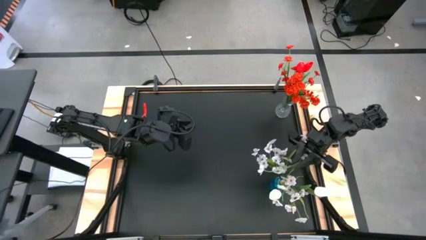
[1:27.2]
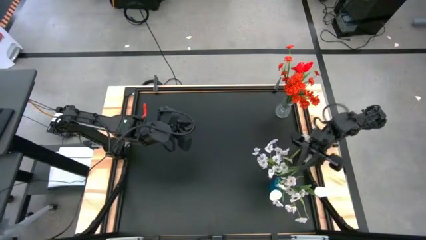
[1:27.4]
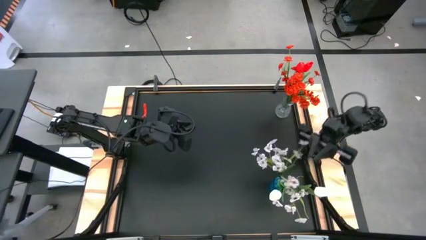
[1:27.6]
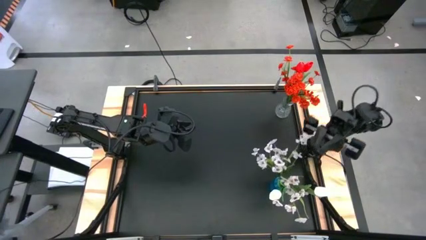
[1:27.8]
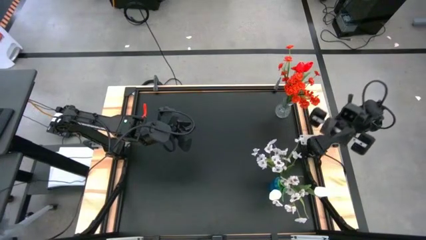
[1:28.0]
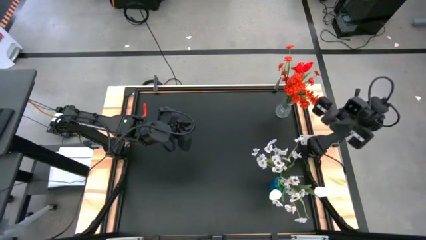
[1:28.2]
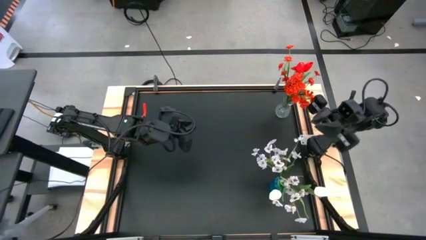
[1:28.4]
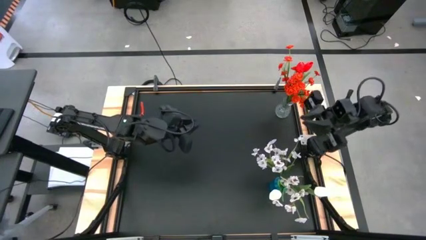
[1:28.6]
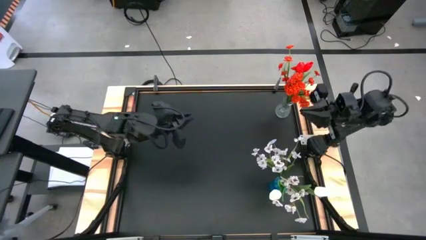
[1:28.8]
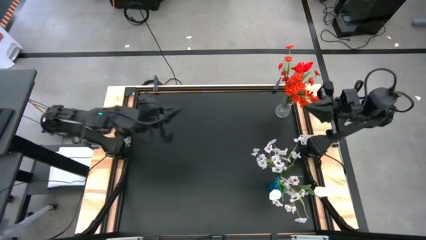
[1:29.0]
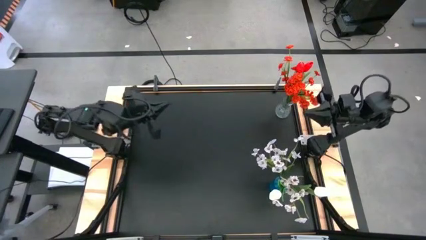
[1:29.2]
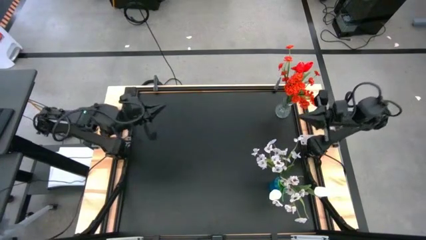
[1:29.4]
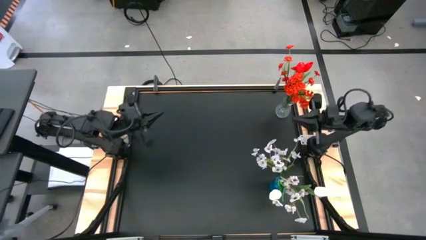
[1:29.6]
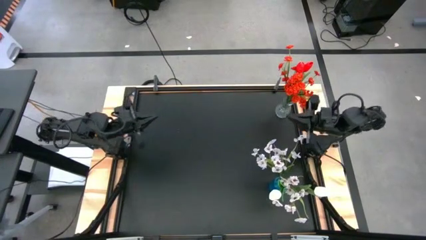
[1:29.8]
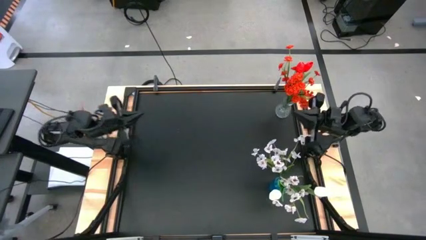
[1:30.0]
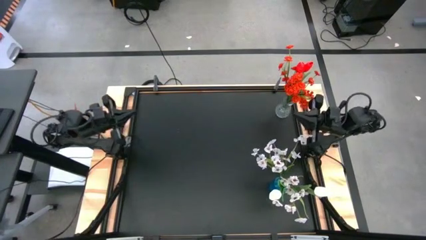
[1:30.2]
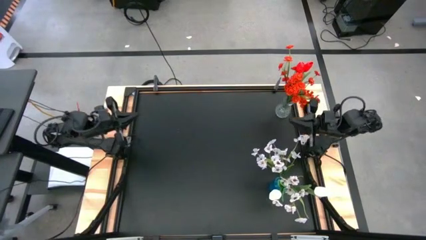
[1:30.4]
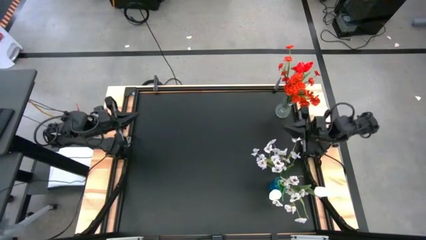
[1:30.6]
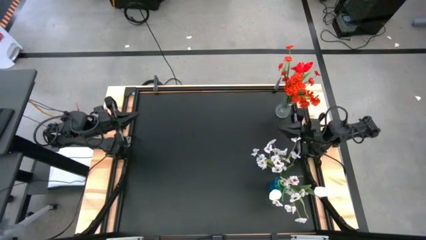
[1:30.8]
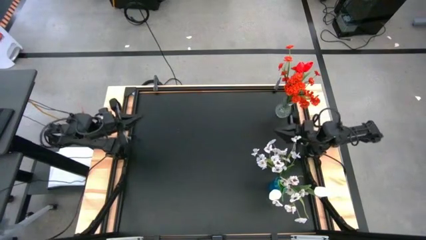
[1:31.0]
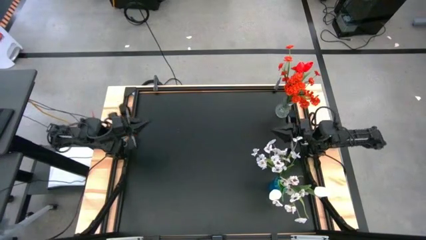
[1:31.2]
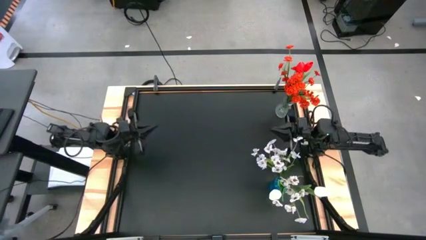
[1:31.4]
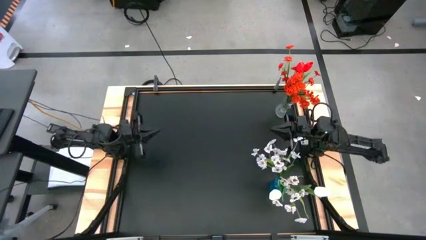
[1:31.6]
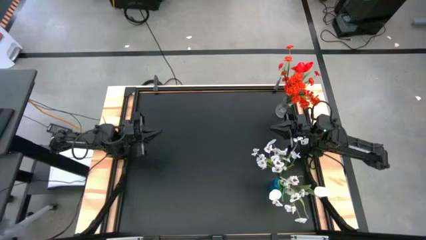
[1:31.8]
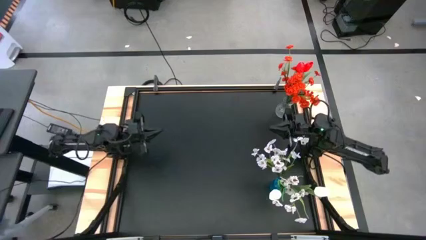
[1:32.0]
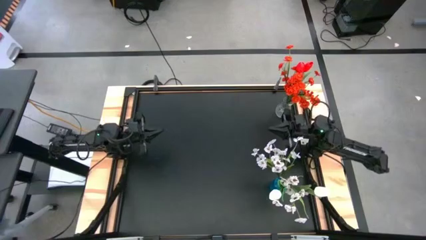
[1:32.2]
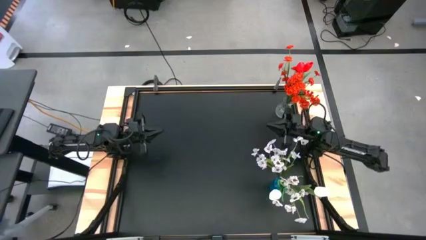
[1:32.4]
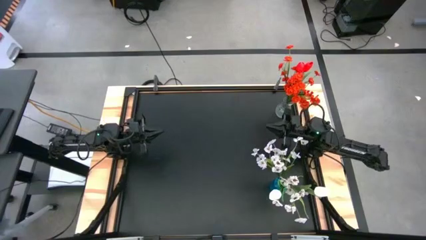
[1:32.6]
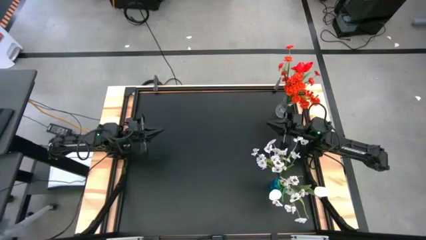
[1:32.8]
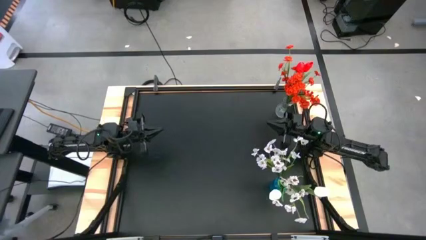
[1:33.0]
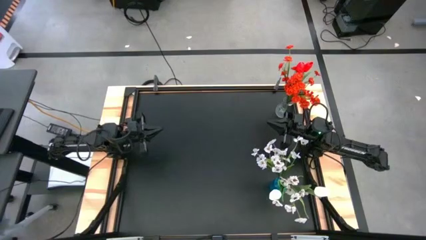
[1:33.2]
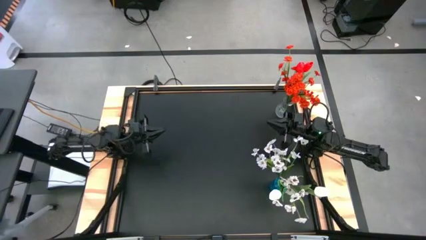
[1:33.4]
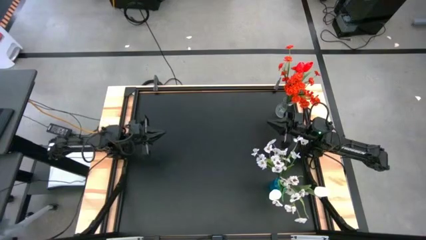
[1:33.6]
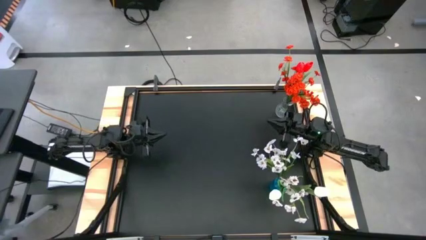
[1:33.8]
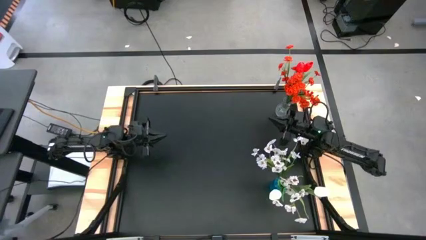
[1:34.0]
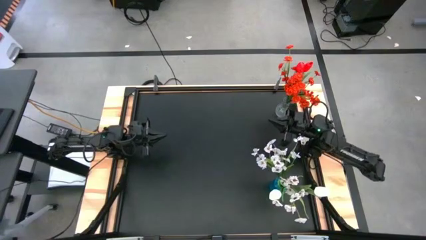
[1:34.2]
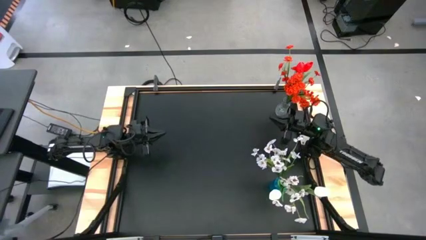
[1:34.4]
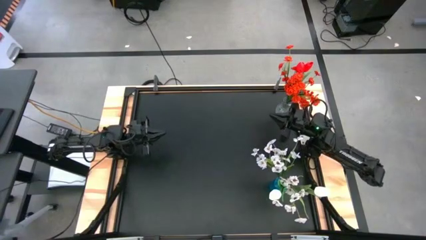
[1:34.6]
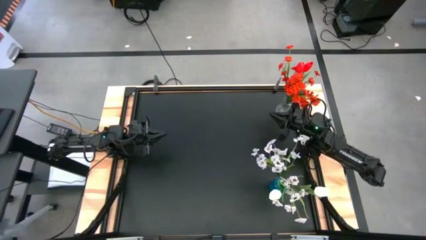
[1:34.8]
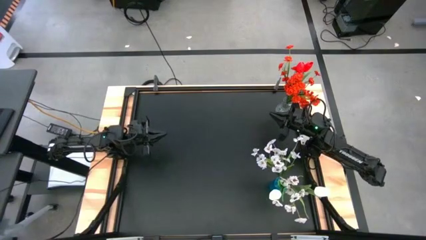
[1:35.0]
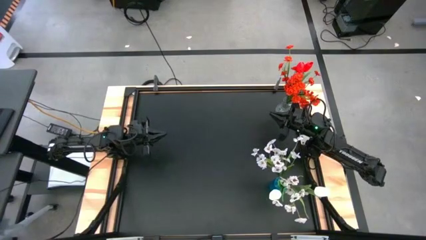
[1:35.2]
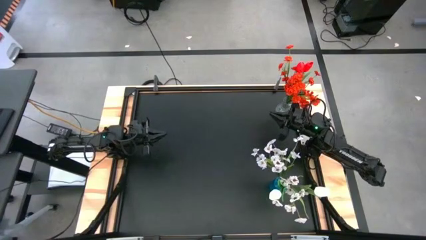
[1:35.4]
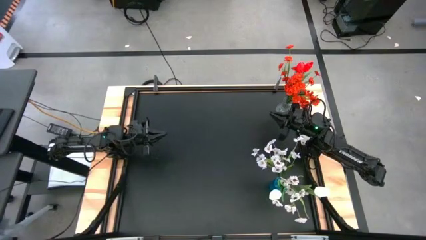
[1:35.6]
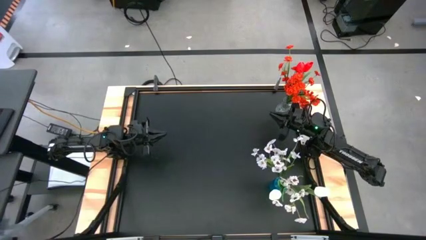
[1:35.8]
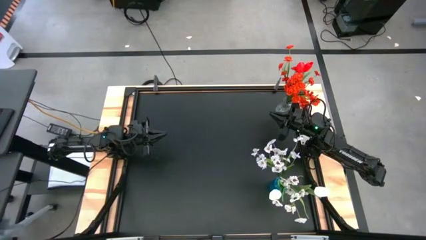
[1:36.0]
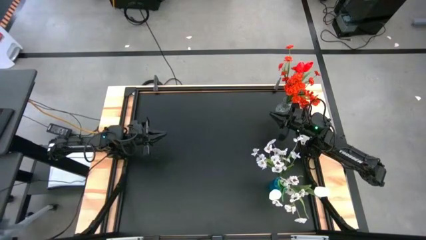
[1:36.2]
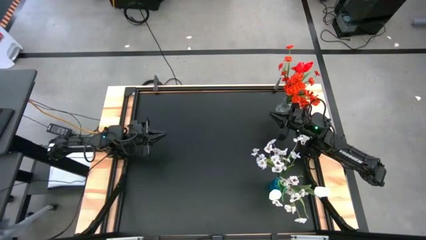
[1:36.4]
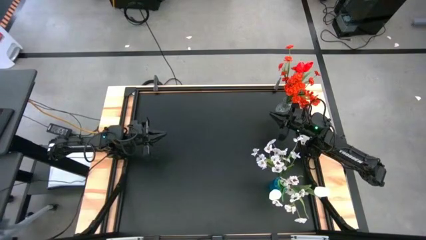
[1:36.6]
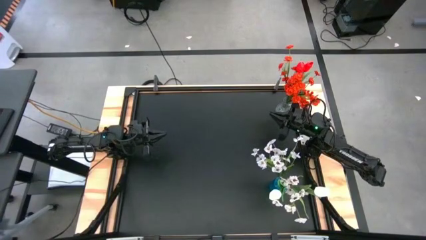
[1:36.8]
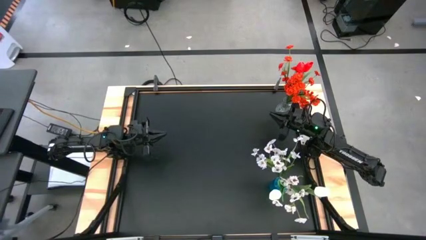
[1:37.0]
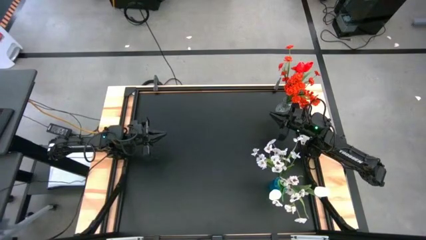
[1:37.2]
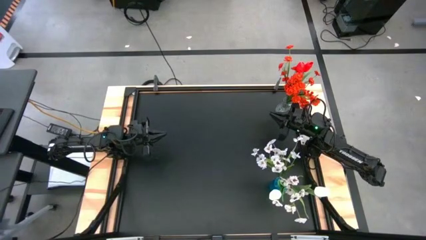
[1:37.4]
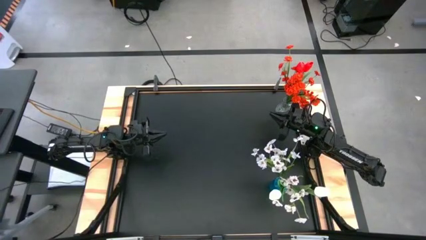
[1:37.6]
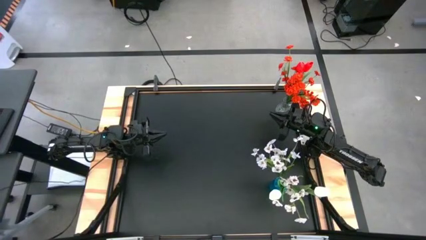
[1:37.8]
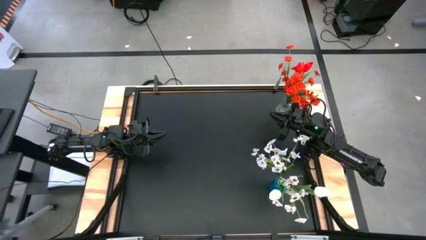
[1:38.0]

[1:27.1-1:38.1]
Task: Sort flowers into vase by color
Return to Home Position

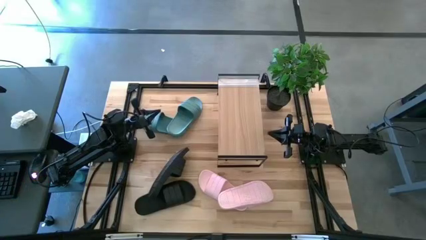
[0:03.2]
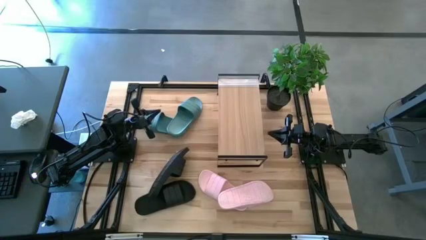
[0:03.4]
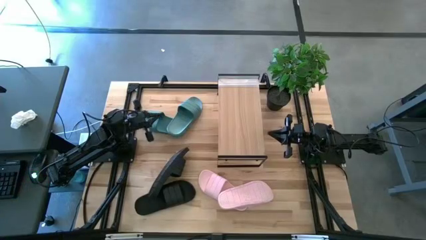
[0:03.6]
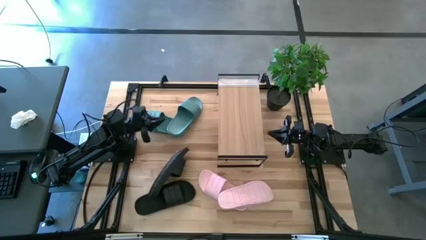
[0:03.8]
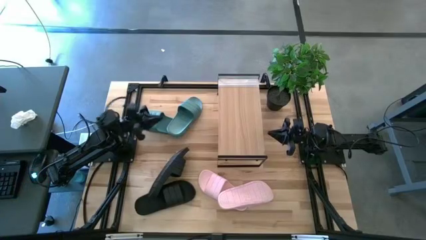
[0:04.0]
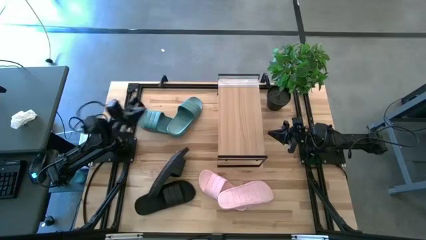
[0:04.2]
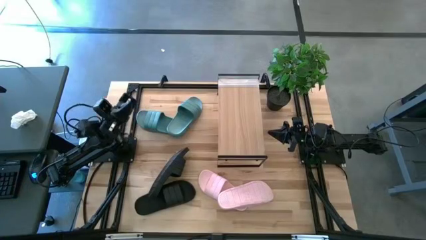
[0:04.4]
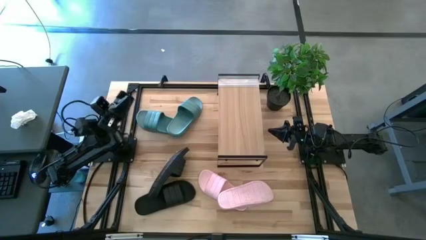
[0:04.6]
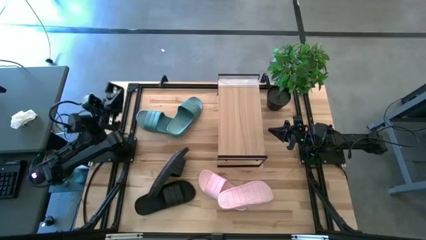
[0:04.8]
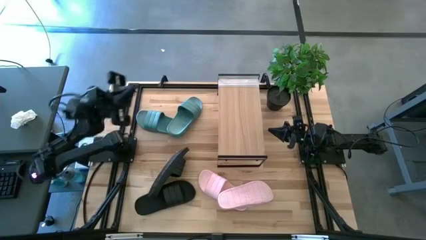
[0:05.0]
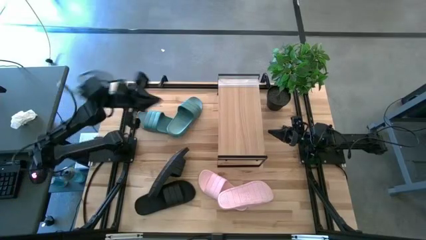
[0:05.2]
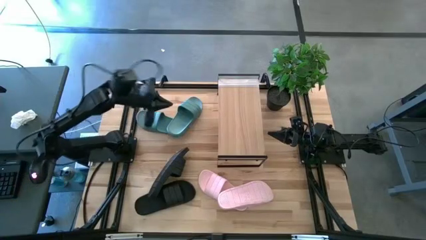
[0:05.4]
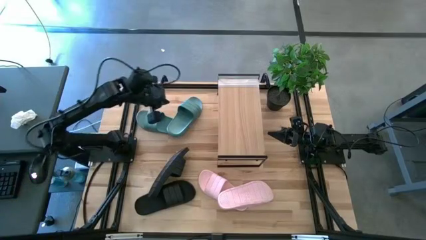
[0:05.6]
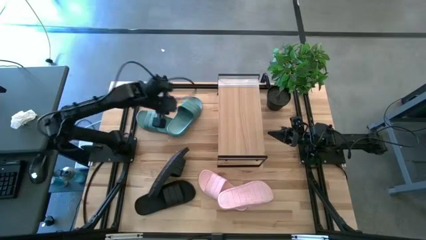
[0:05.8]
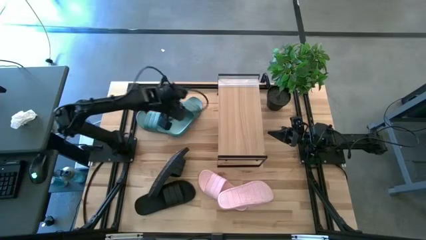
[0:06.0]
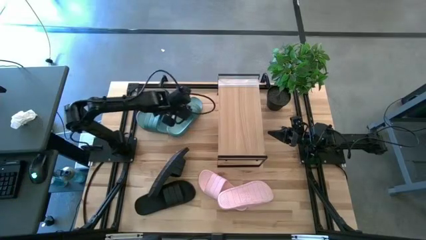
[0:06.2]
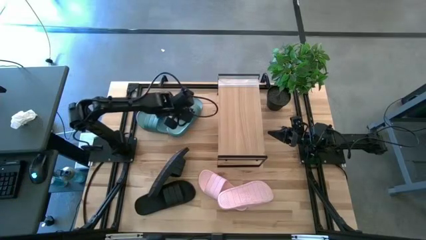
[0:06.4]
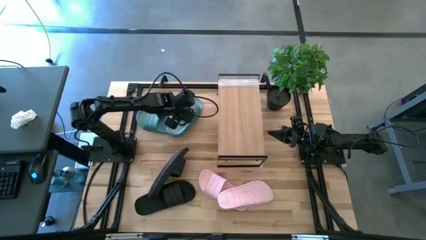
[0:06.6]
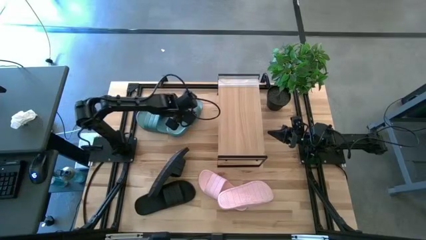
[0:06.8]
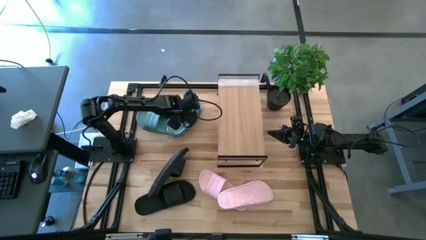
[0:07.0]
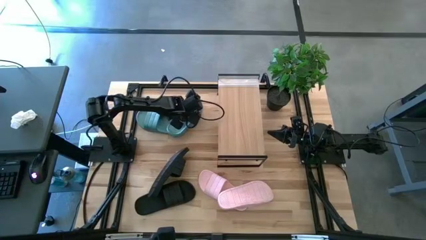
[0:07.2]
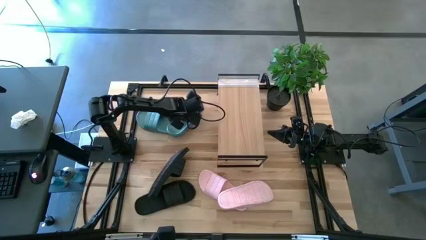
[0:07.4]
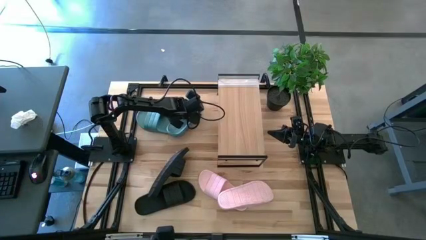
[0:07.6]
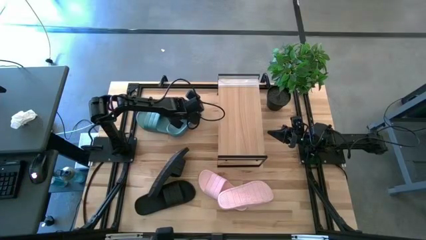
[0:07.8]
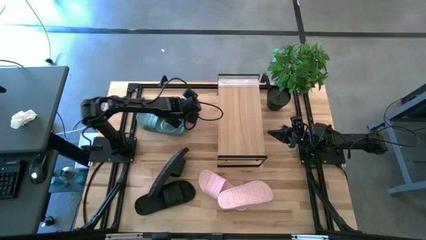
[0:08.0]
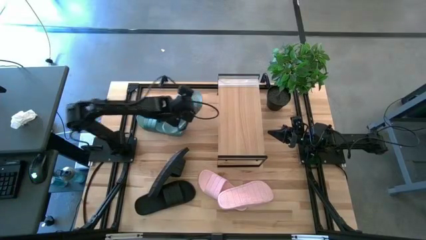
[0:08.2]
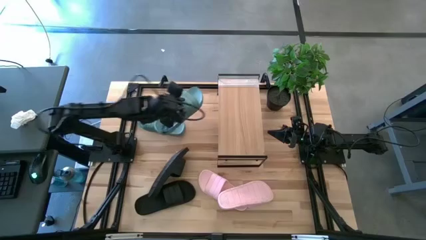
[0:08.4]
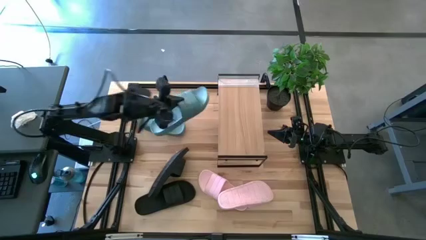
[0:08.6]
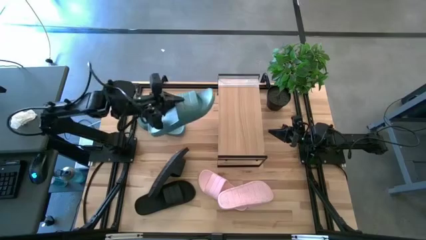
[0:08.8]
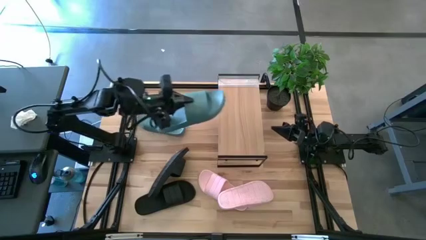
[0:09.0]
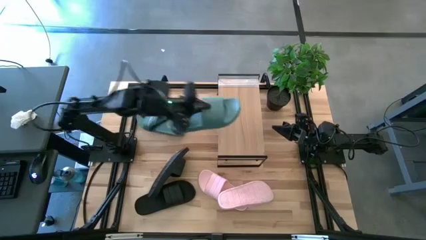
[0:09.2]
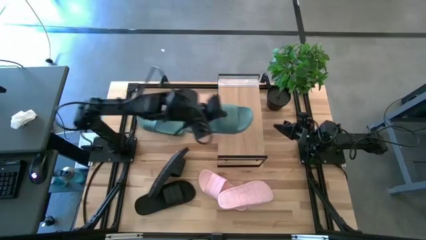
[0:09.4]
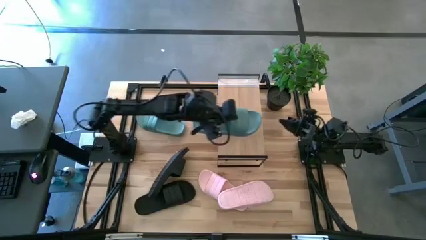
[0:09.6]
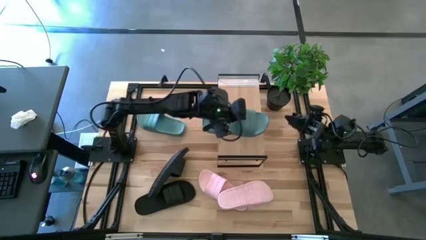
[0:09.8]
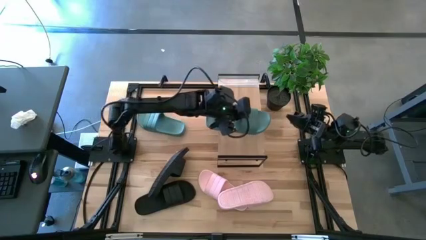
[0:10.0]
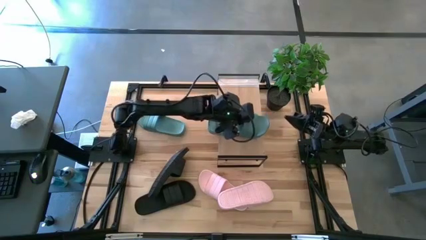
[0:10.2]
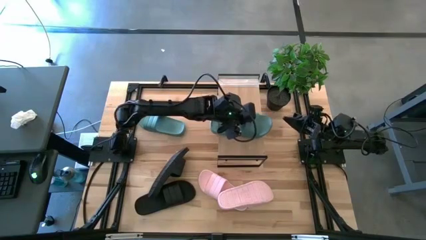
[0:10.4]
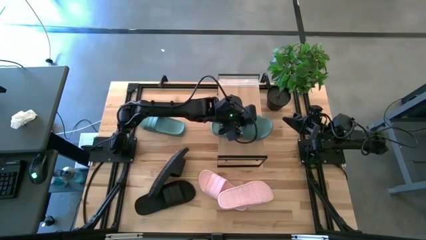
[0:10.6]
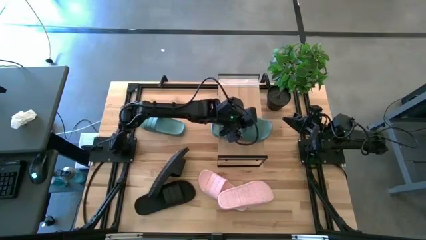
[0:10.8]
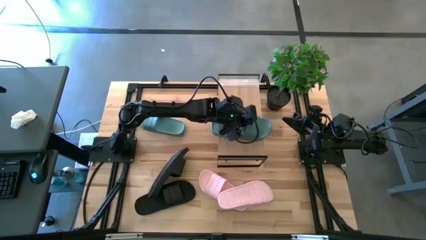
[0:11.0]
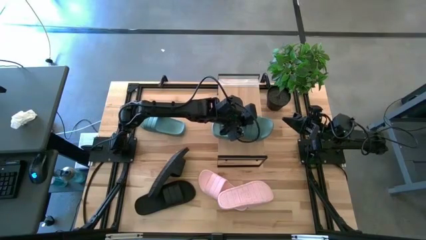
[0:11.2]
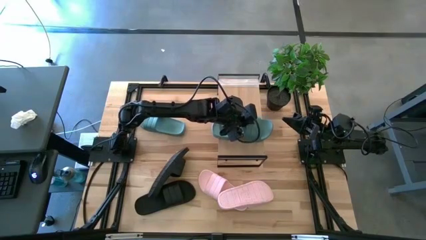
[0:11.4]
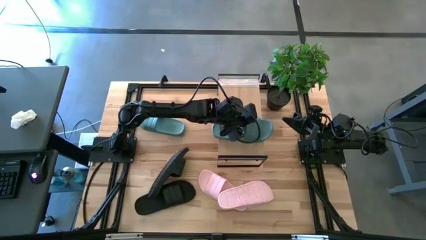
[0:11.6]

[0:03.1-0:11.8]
Task: Pick and place slides into the shelf
Put the right green slipper on the shelf
